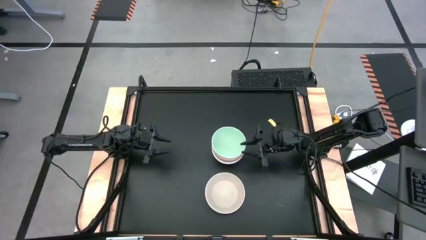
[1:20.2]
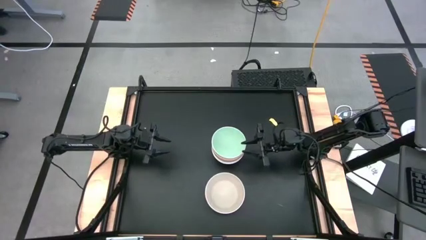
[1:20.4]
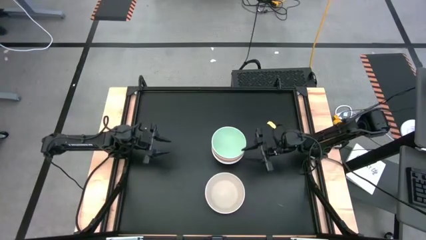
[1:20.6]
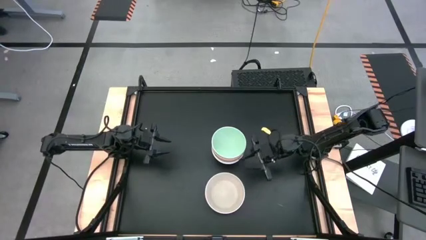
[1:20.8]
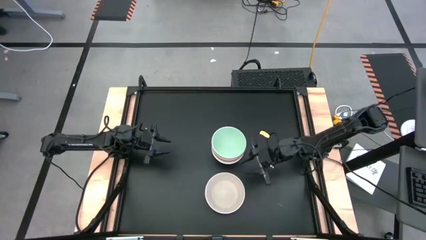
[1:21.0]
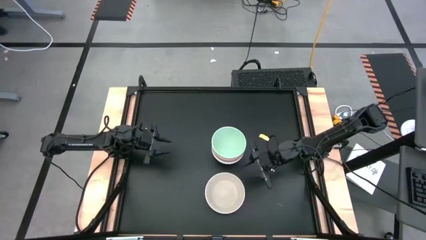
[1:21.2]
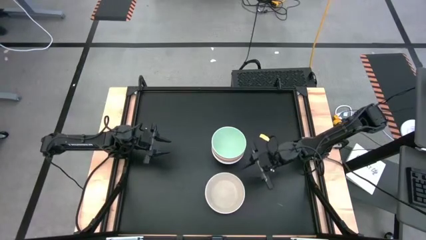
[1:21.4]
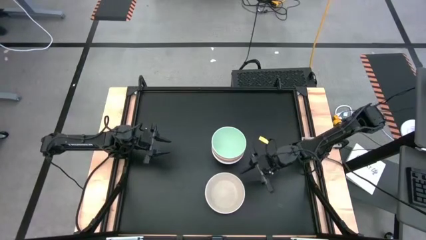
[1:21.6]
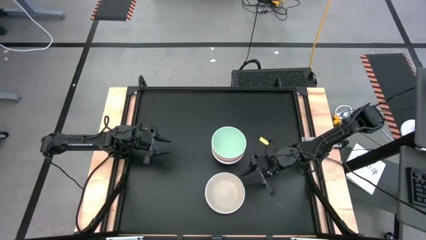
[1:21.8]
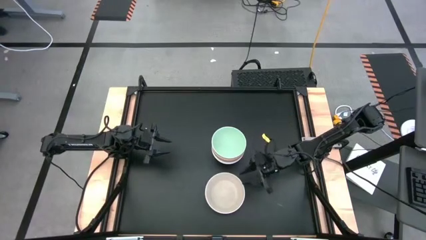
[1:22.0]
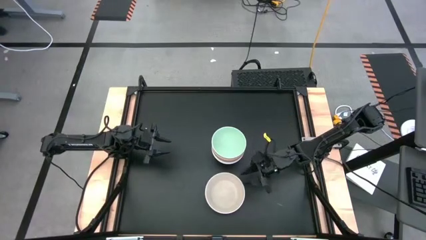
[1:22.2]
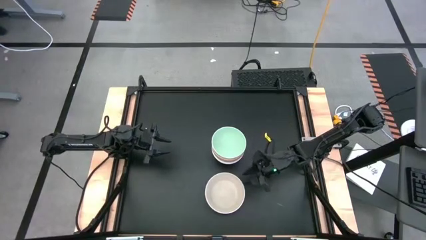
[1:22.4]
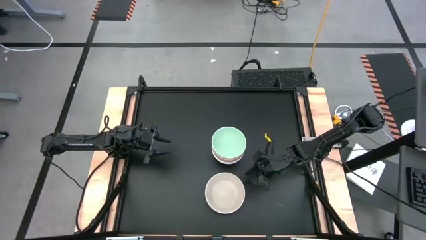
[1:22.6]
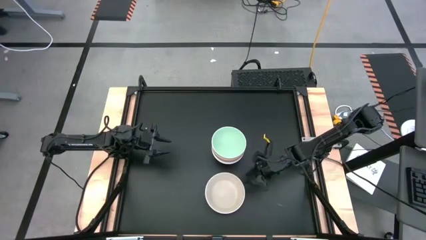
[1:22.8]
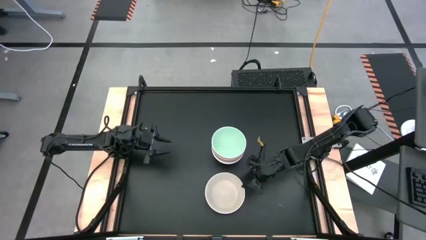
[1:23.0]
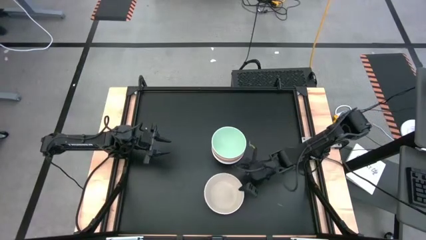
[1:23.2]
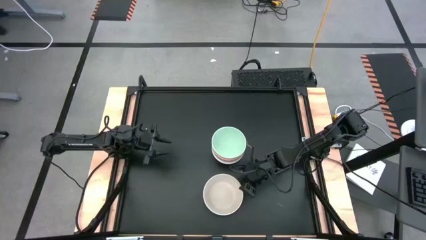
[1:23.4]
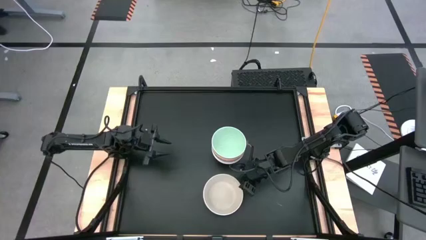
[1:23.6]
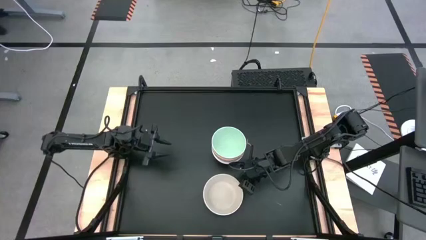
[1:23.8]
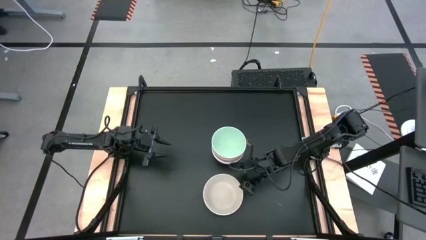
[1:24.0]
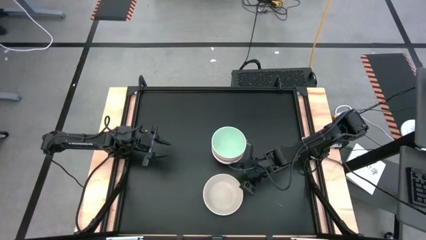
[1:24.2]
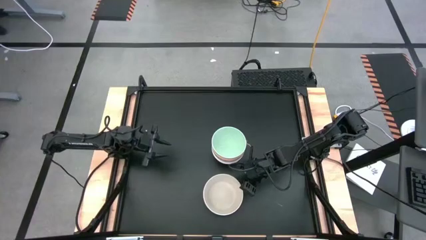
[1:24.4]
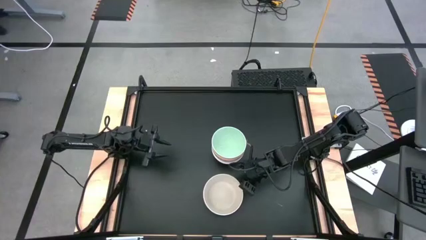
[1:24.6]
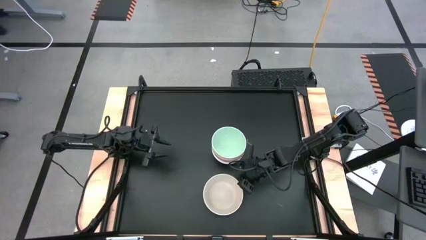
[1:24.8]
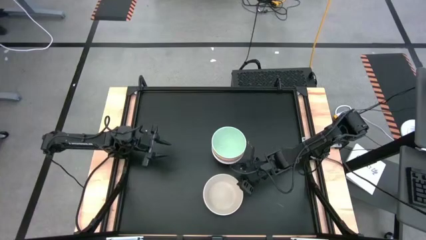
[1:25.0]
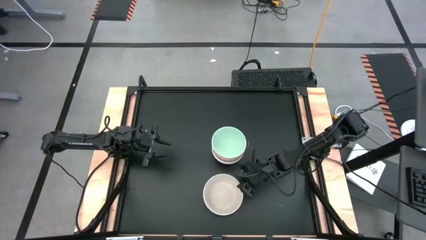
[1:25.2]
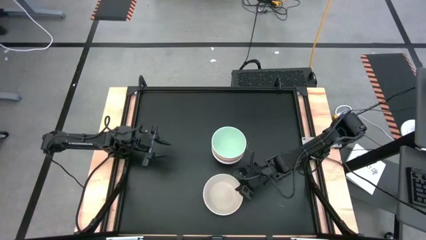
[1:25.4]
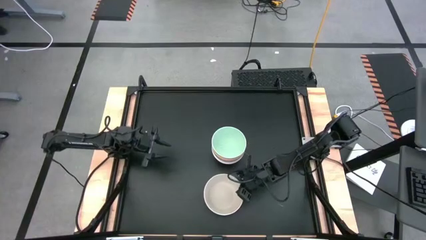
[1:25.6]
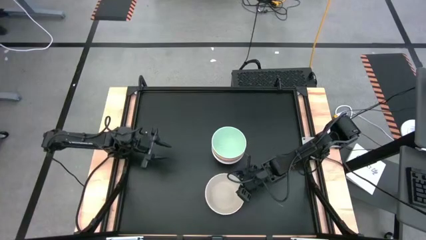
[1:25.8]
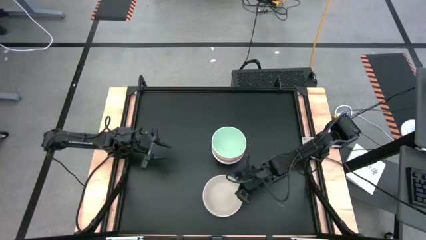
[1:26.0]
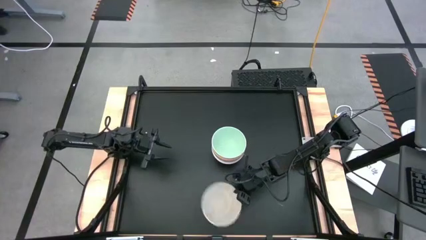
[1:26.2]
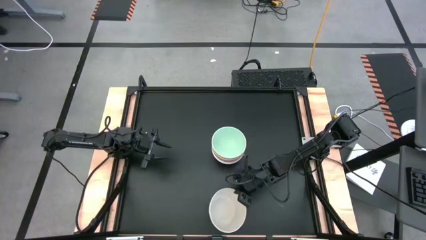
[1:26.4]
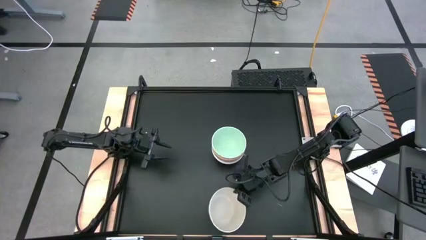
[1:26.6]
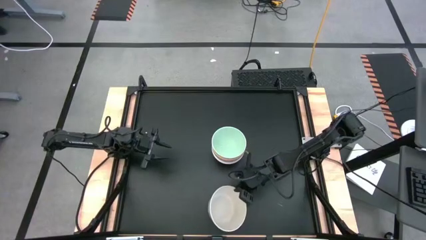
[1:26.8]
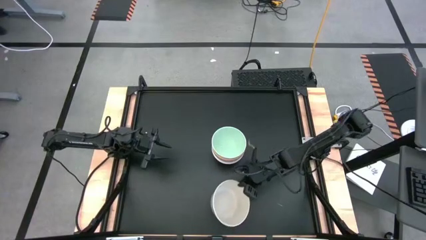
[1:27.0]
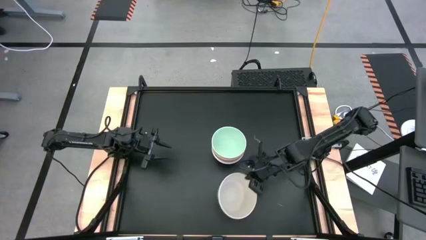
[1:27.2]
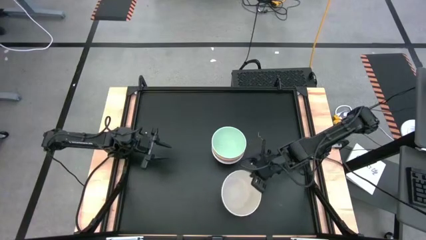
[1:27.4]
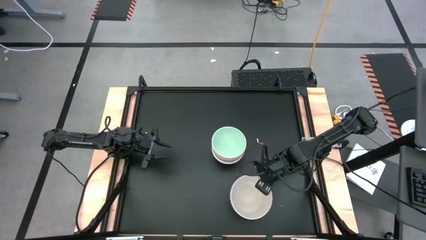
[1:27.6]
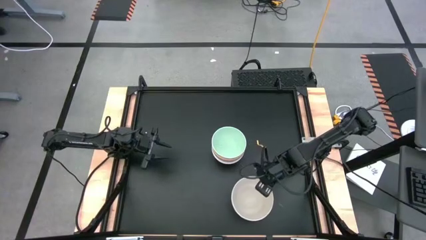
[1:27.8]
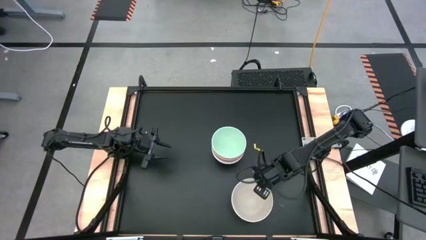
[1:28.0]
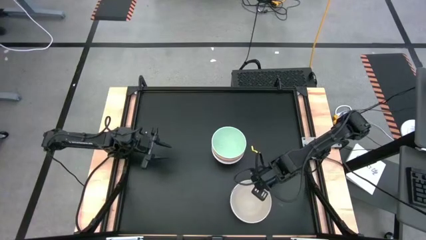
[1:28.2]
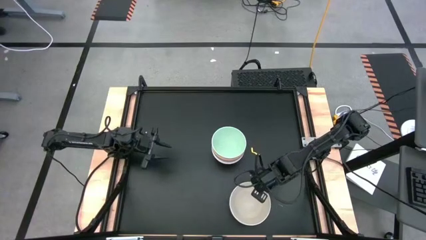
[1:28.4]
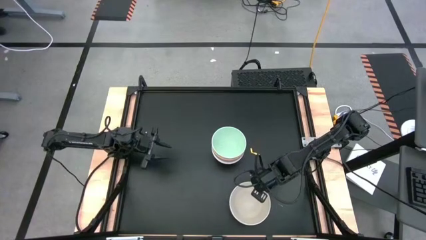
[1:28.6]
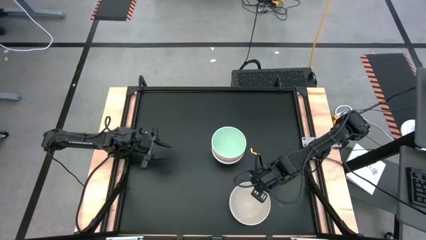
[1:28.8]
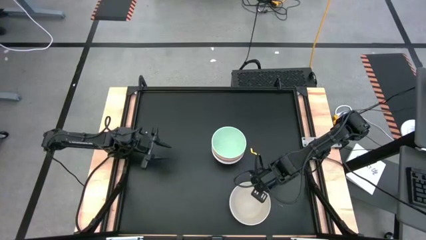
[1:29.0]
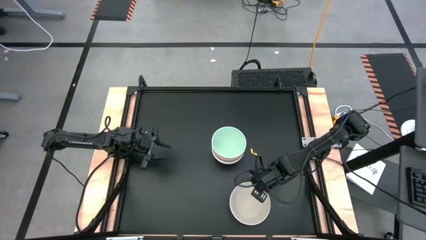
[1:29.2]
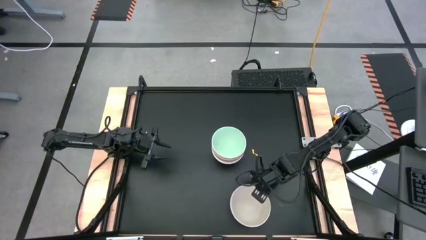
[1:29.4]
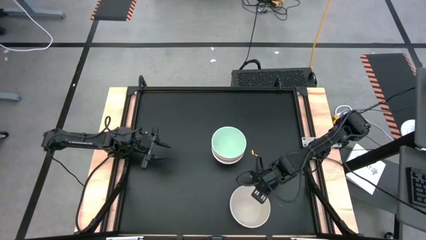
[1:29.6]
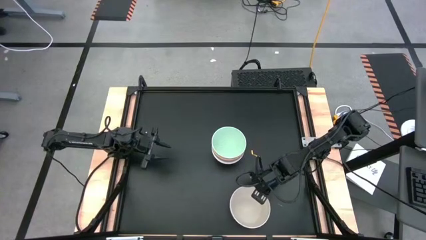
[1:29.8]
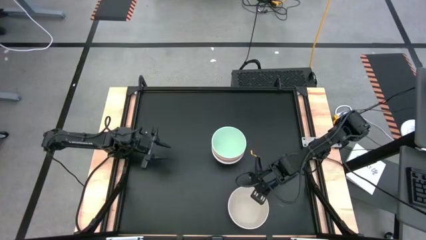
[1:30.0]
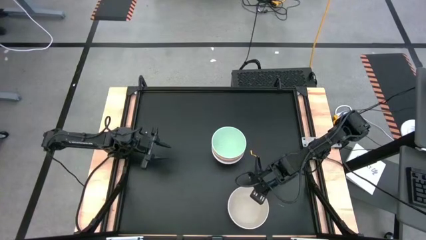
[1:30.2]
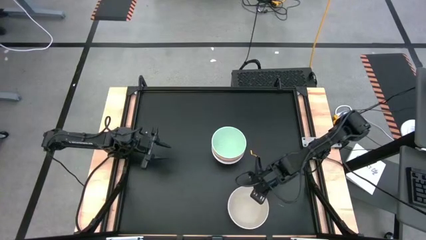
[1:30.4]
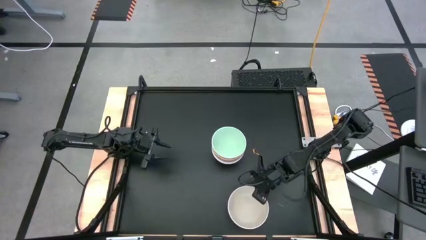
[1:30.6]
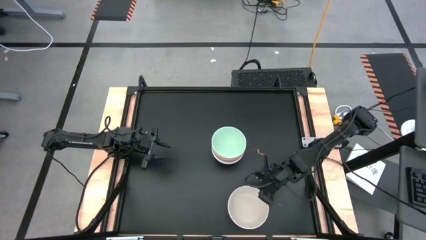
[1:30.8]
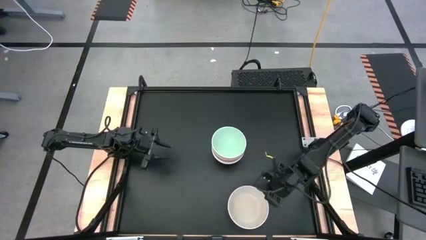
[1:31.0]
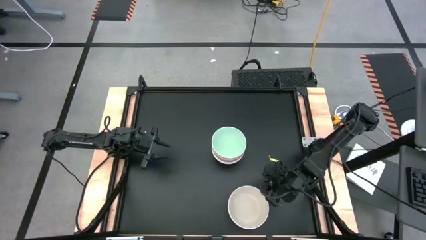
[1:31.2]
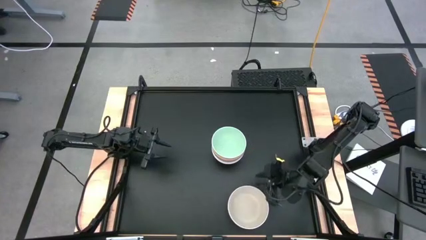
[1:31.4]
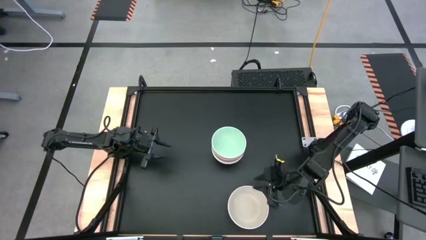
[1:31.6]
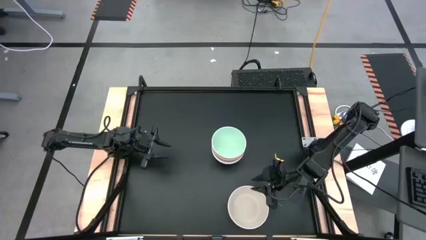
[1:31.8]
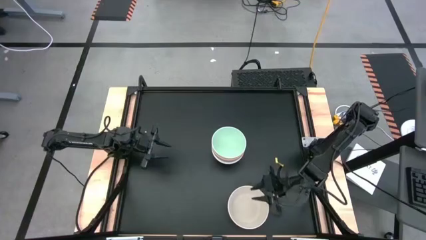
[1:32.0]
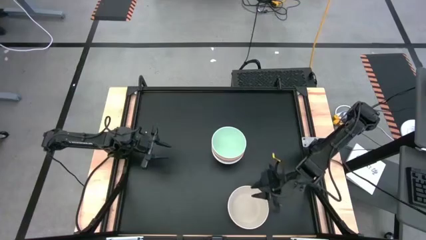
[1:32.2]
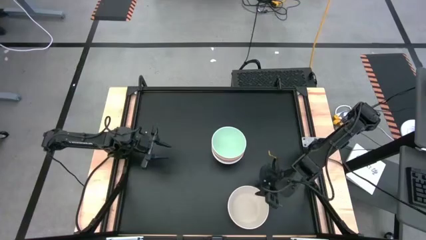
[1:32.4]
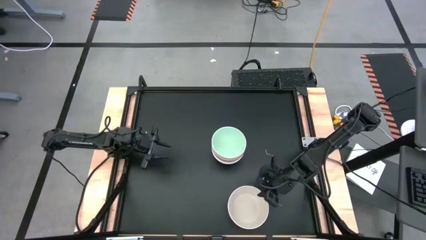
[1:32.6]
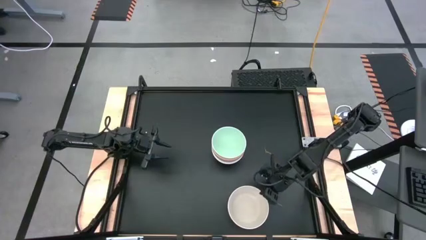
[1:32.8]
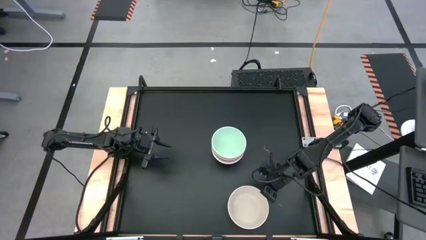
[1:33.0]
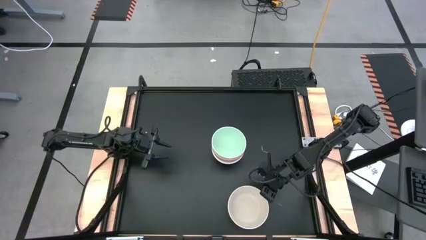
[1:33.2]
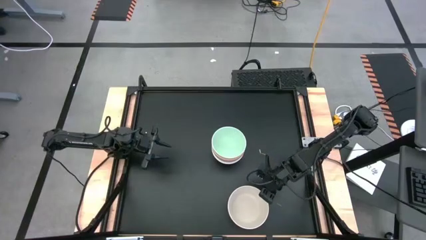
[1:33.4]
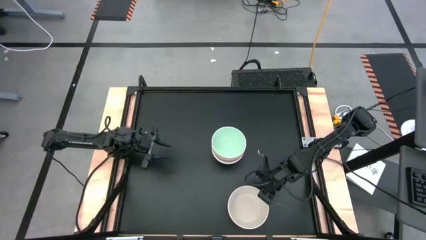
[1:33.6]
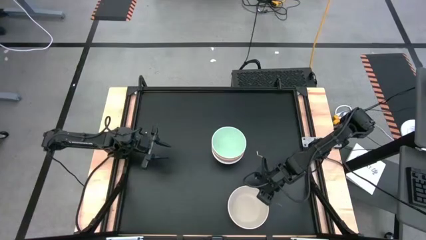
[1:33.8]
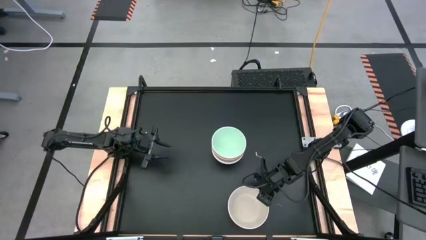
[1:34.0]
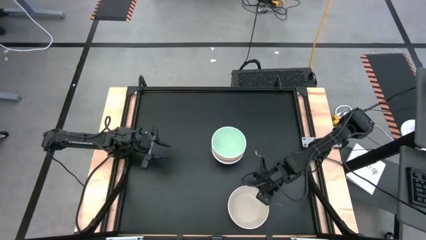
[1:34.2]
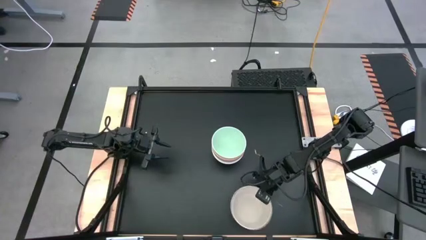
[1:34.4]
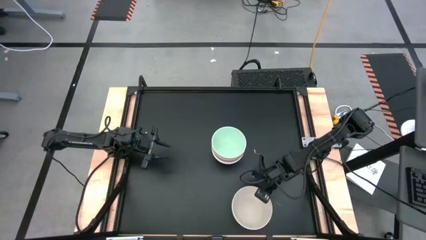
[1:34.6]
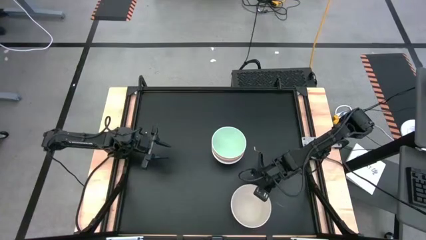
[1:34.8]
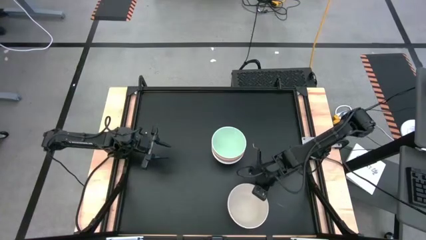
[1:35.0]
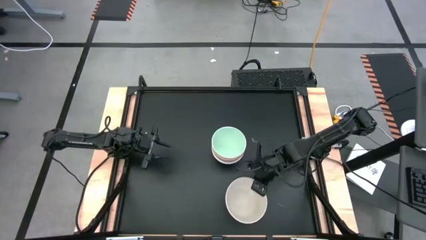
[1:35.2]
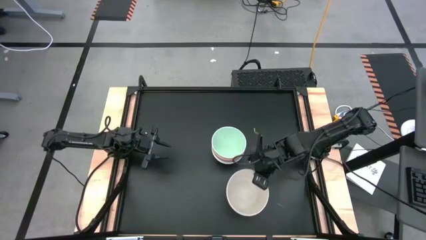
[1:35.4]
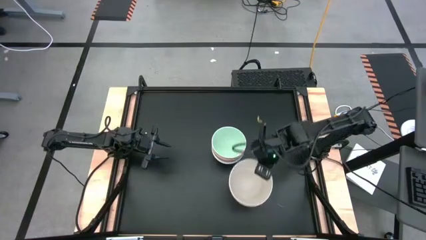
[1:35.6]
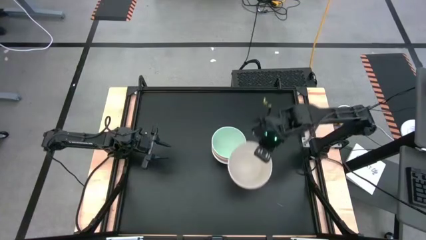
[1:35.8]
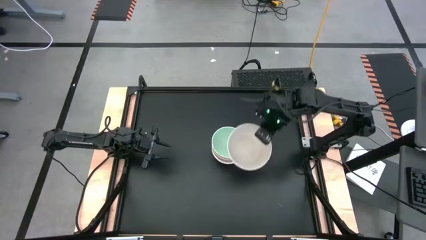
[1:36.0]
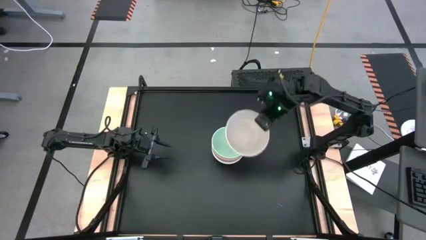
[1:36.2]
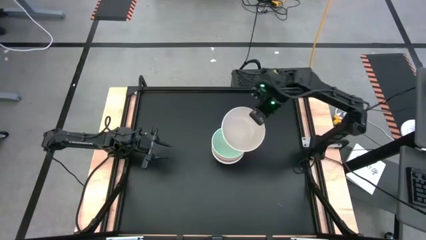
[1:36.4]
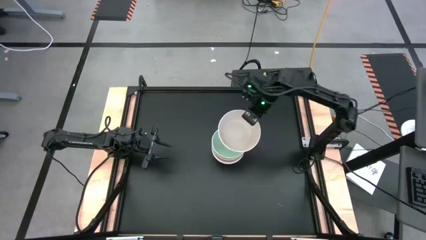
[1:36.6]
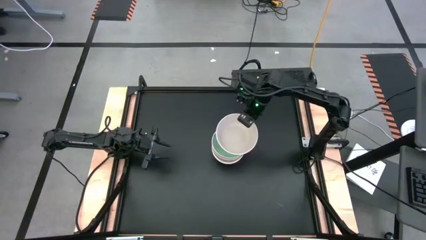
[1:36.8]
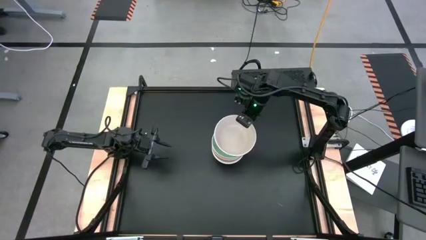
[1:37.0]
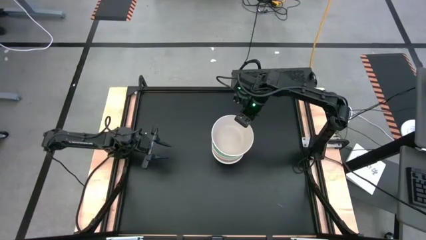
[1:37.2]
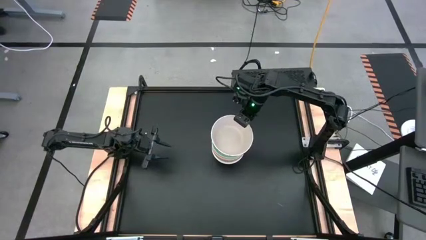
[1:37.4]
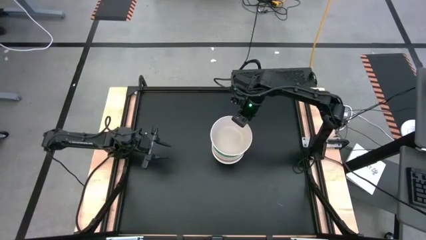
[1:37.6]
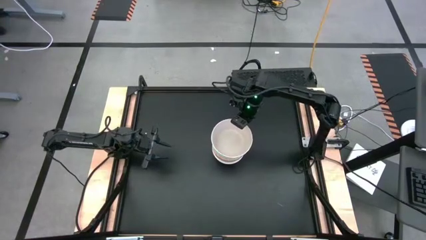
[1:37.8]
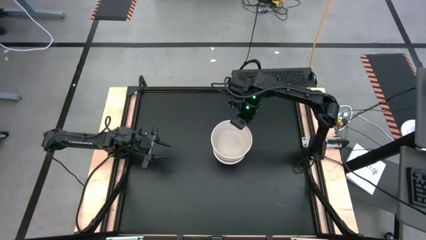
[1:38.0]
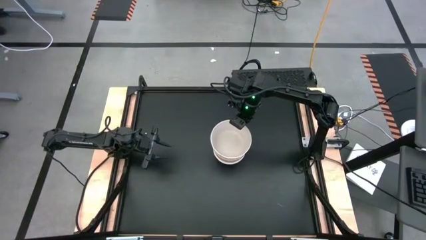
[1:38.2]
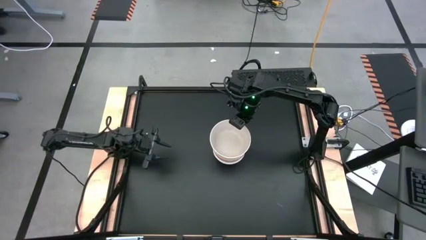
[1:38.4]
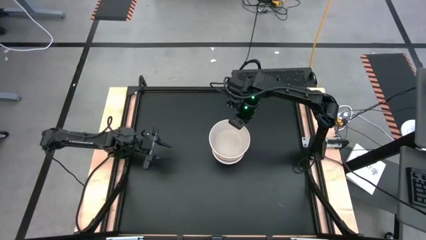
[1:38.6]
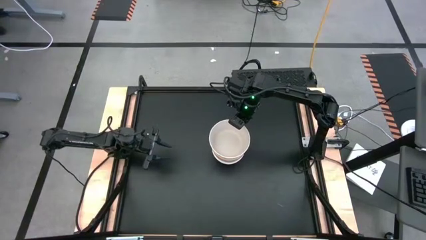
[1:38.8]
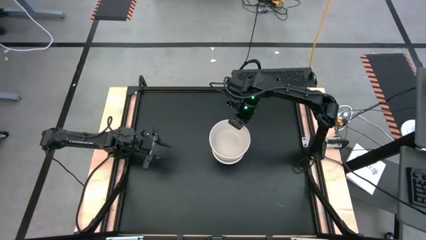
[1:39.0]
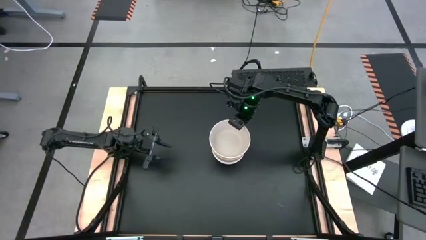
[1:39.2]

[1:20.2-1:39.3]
Task: Nest bowls inside each other
Stack the white bowl on the stacked blue bowl
